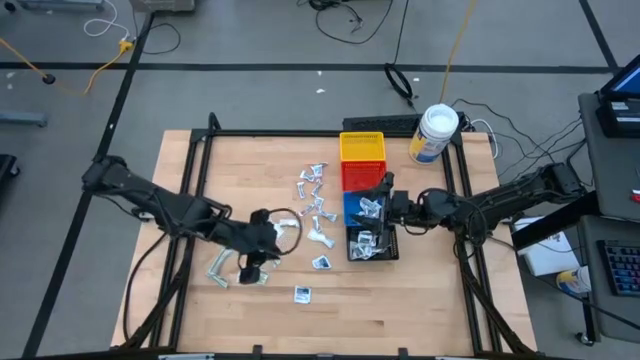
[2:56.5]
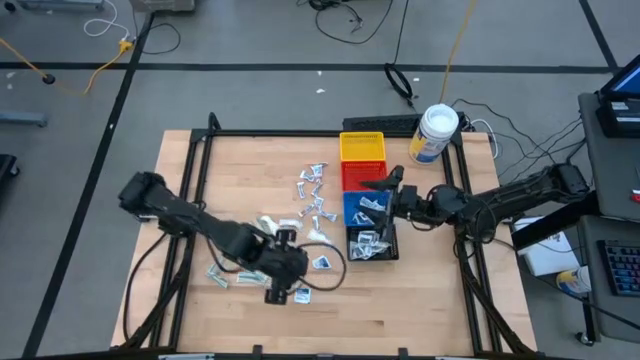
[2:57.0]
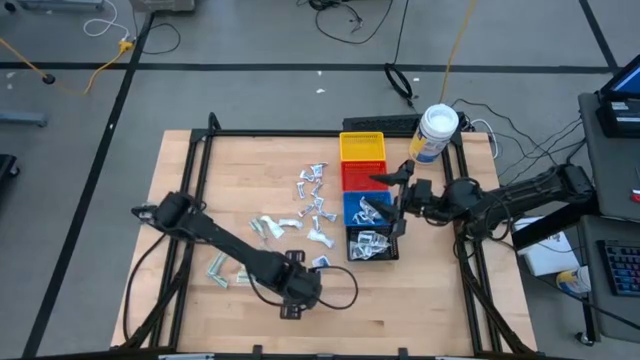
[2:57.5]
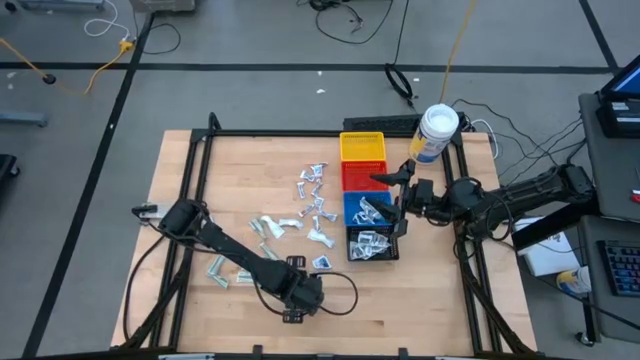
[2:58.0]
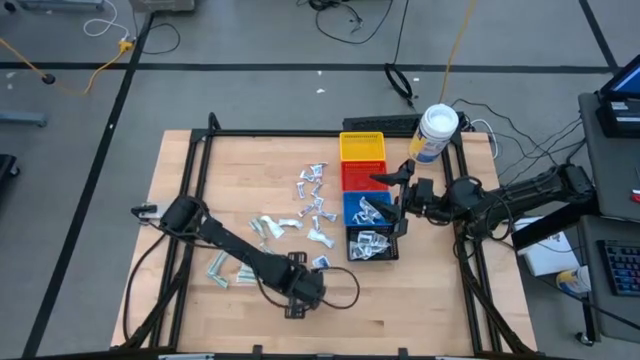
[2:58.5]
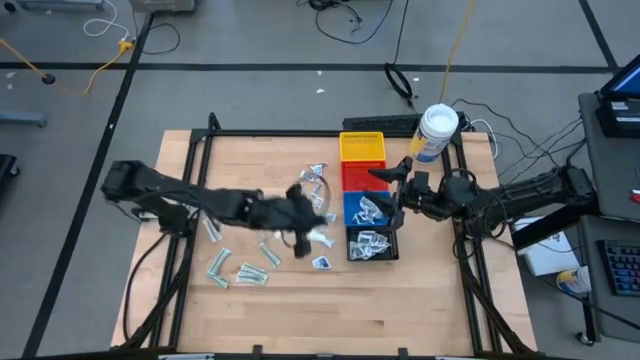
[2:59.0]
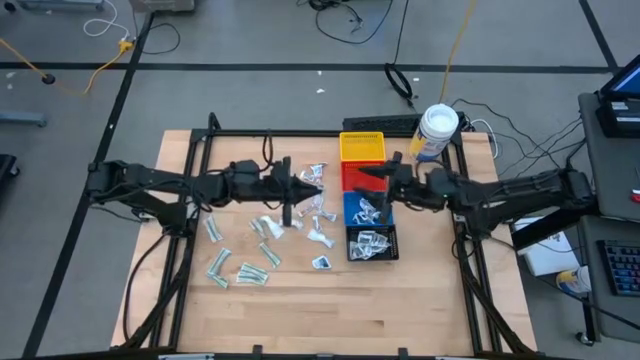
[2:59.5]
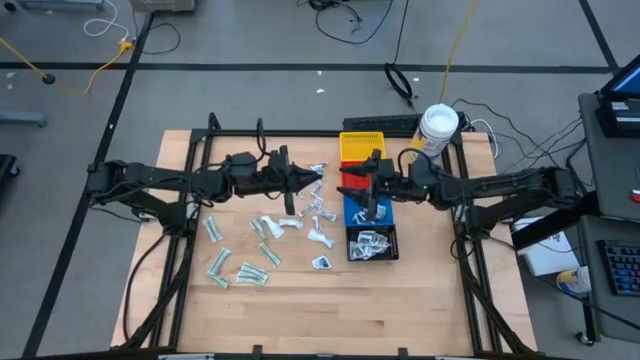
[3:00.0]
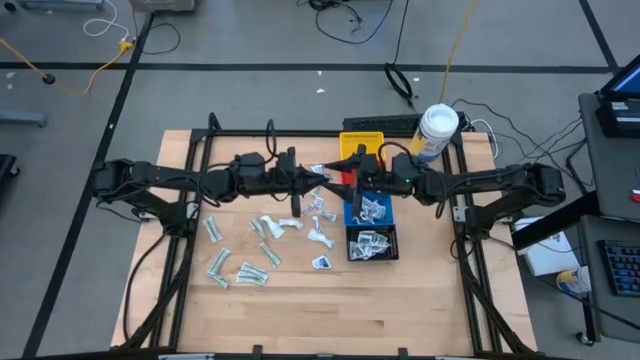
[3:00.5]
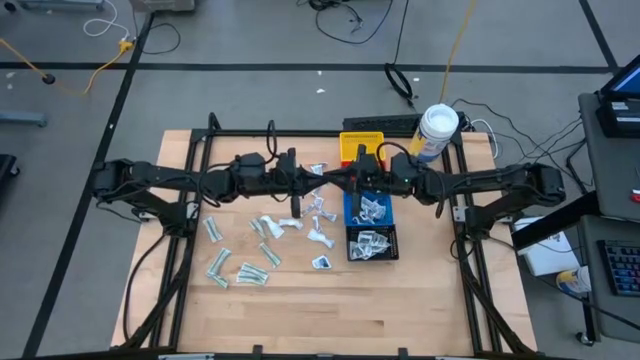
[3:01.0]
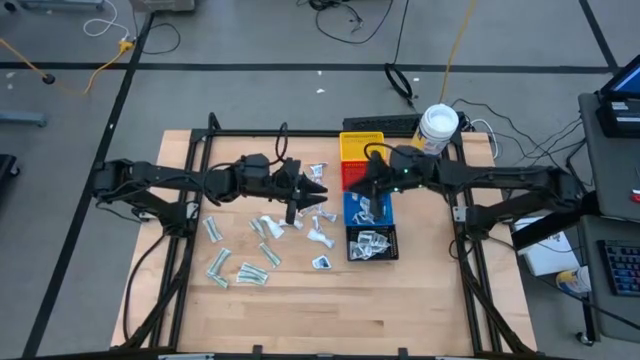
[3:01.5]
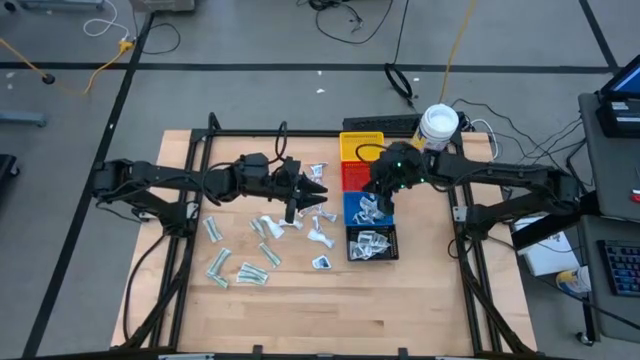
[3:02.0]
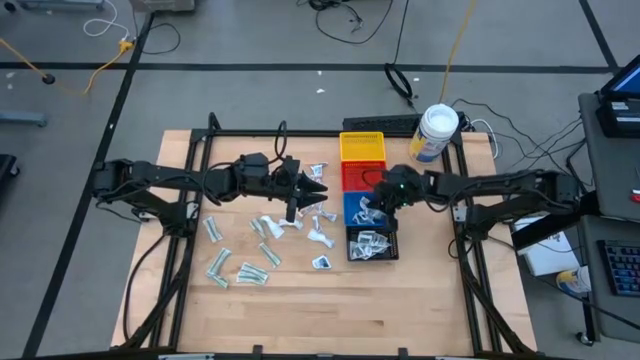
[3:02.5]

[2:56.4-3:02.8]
Task: Pick & Place First Aid Supplies
Put the blue alcohol pad into the blue bin

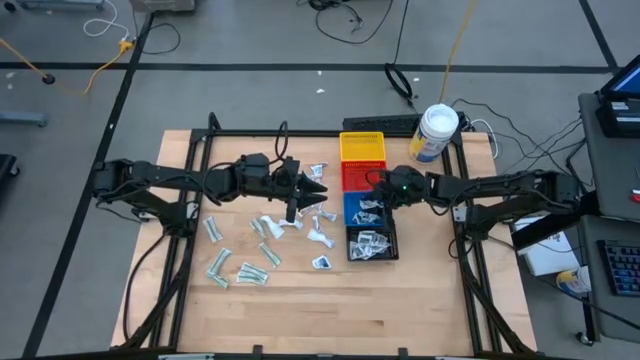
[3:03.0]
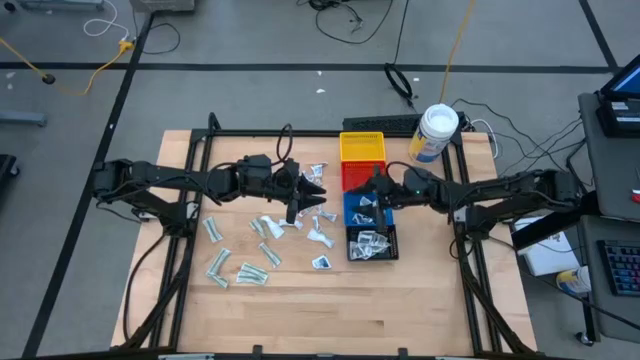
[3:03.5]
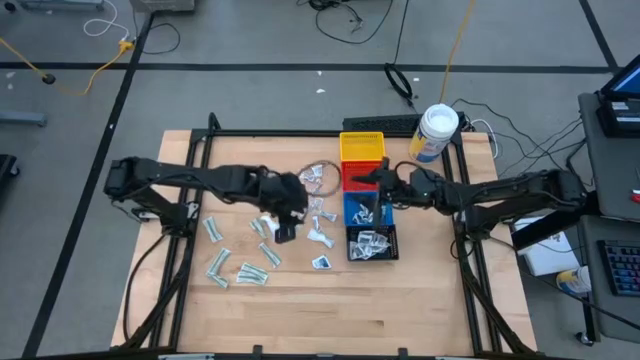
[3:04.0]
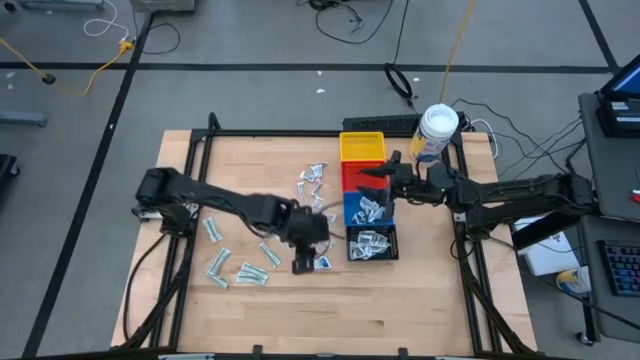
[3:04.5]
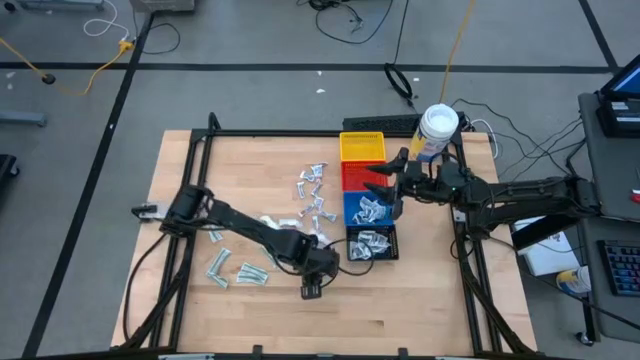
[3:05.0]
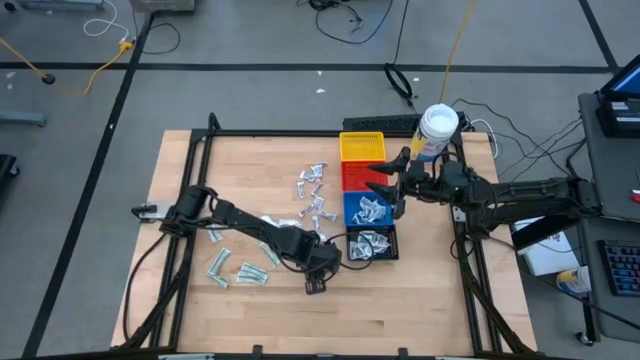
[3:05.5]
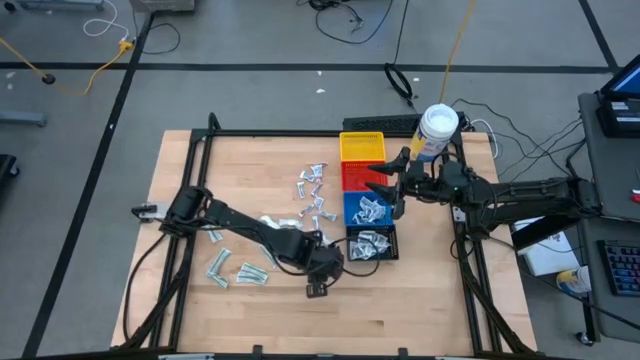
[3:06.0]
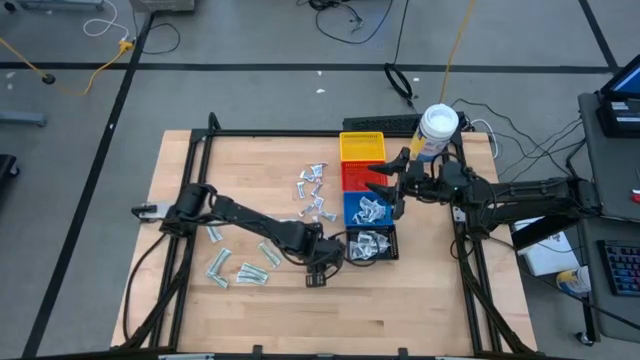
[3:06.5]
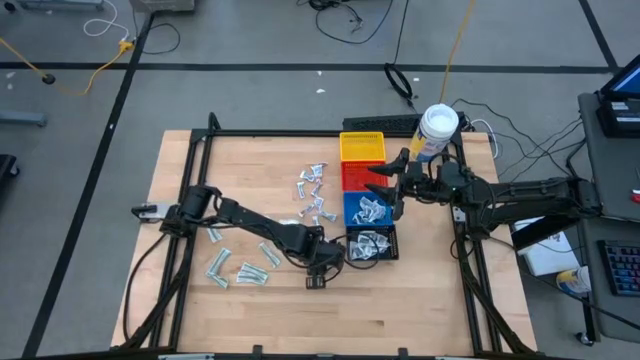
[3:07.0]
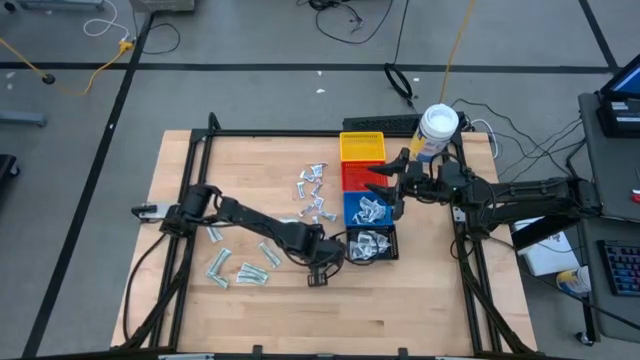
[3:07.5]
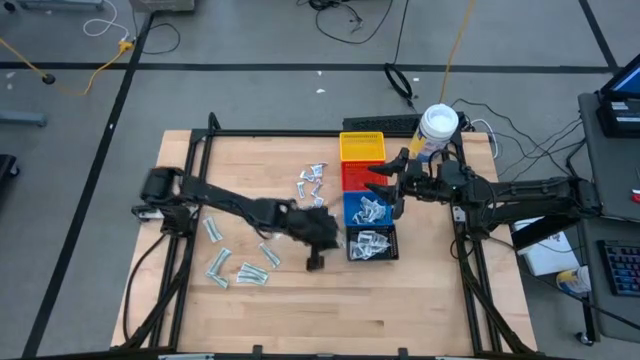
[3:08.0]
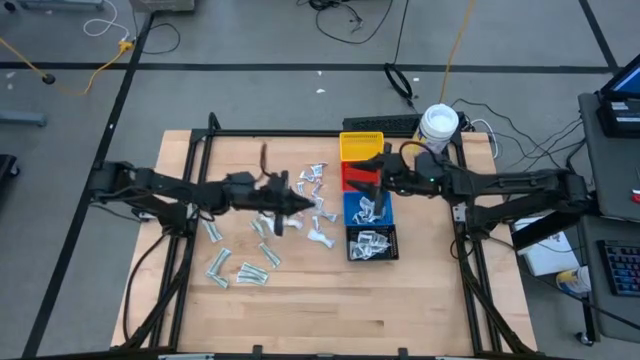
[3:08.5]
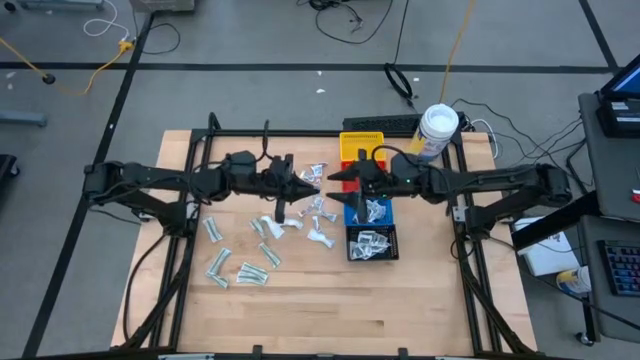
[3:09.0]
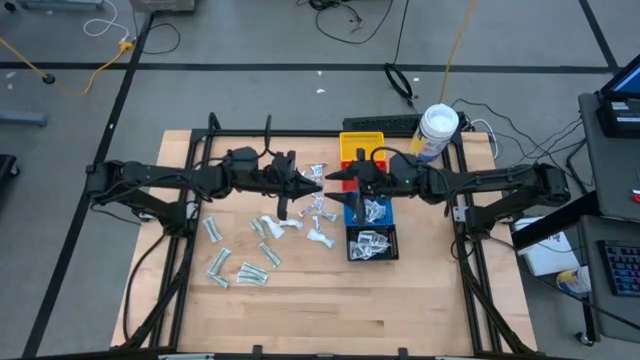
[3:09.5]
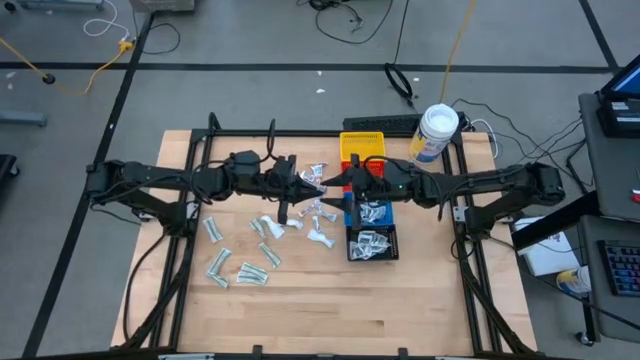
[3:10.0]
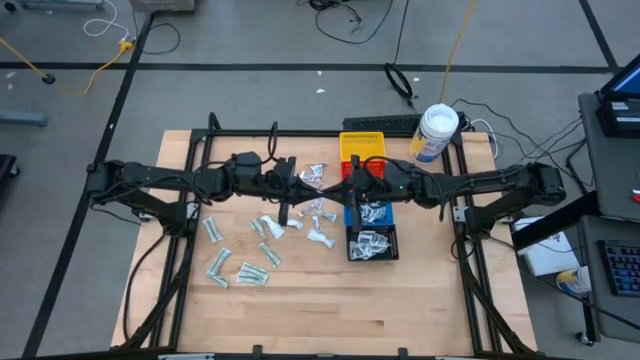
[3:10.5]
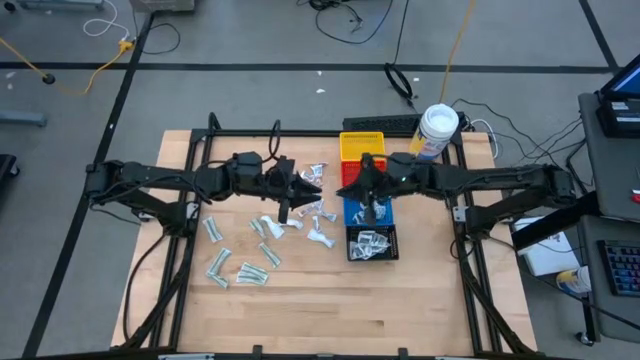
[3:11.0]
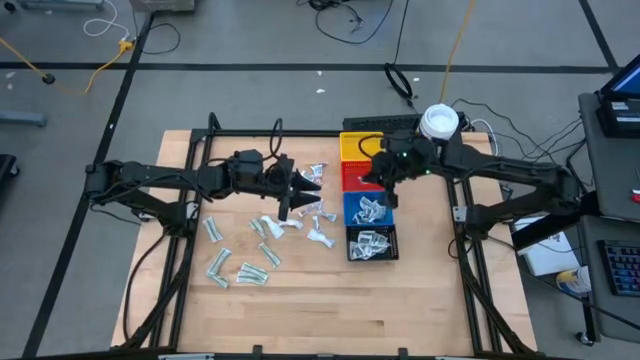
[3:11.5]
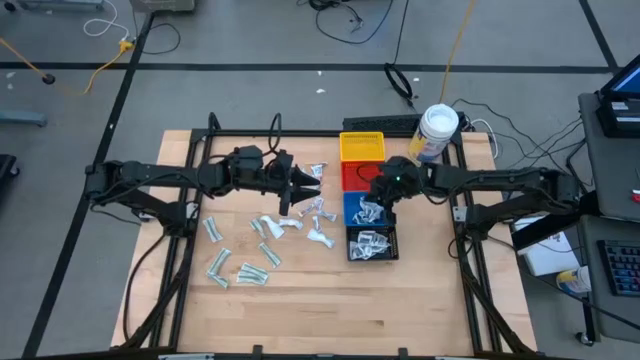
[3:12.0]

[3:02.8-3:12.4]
Put the blue alcohol pad into the blue bin

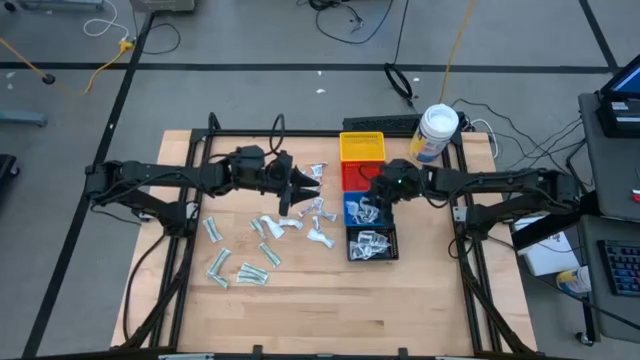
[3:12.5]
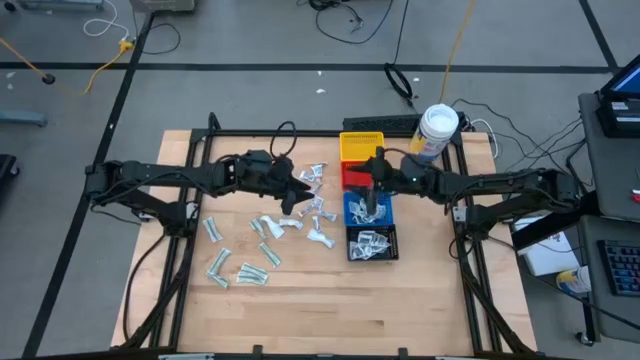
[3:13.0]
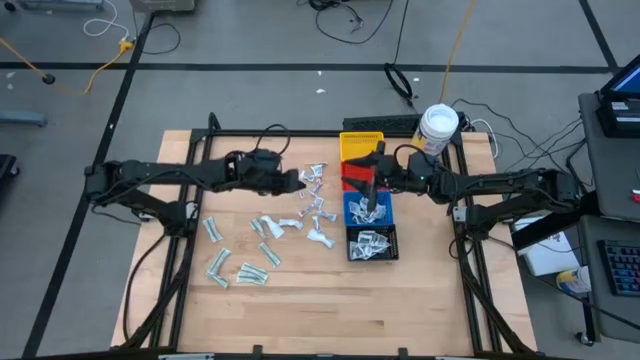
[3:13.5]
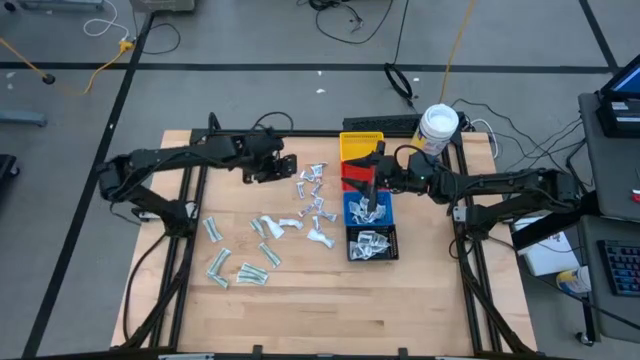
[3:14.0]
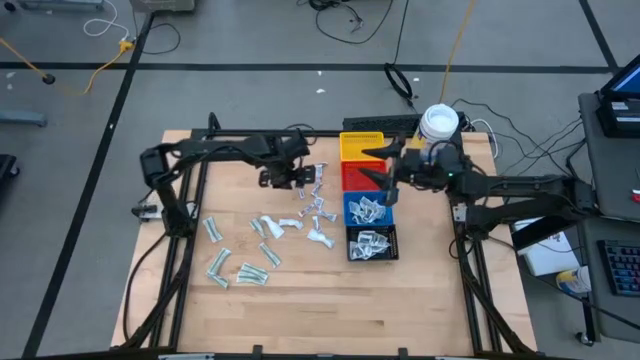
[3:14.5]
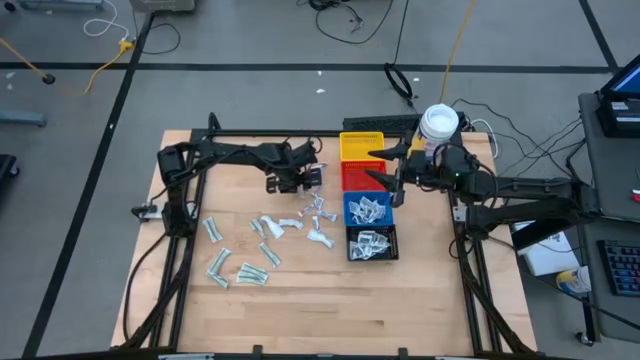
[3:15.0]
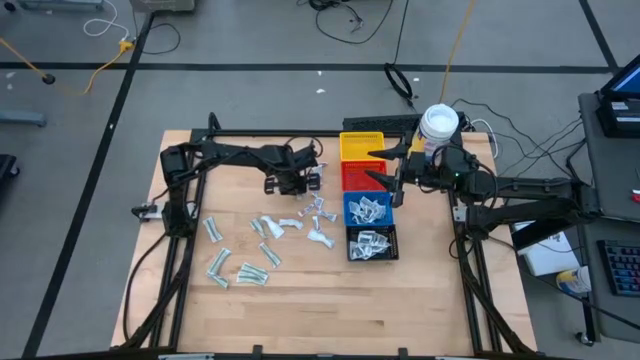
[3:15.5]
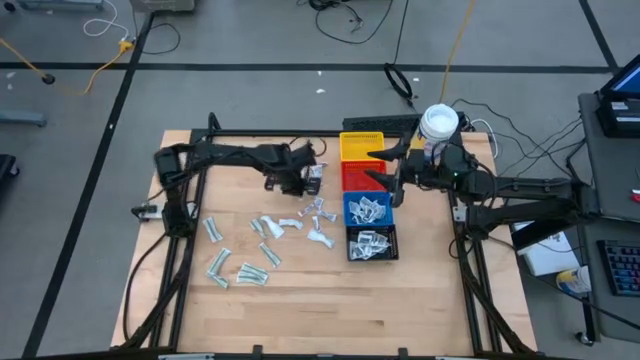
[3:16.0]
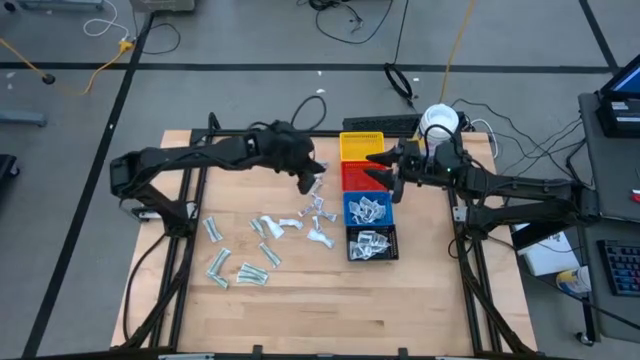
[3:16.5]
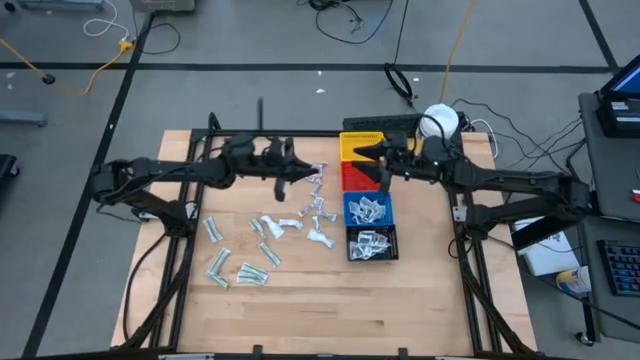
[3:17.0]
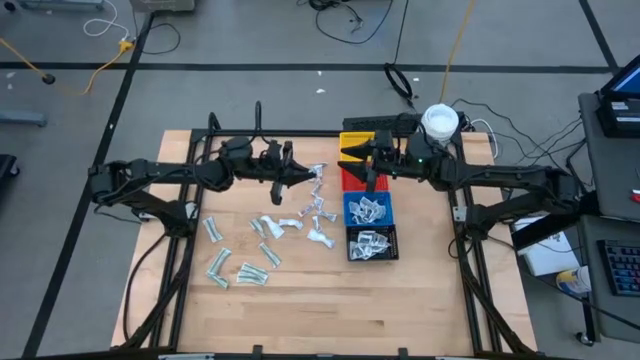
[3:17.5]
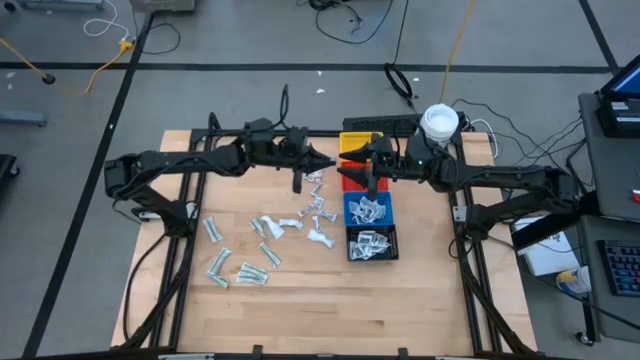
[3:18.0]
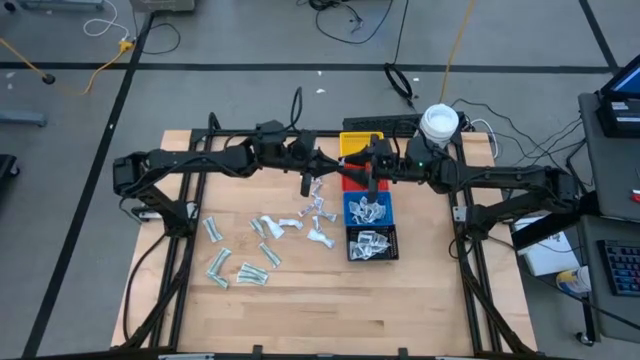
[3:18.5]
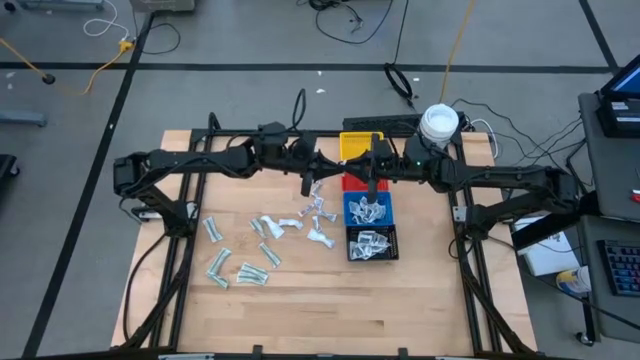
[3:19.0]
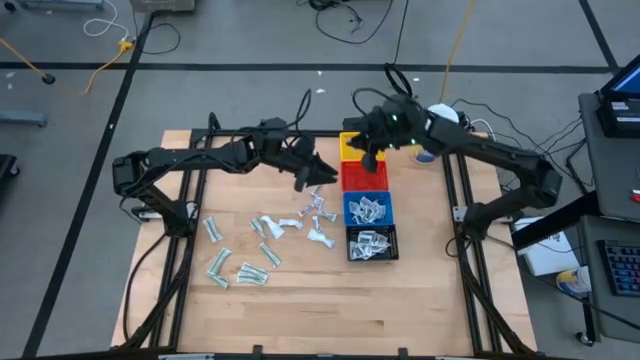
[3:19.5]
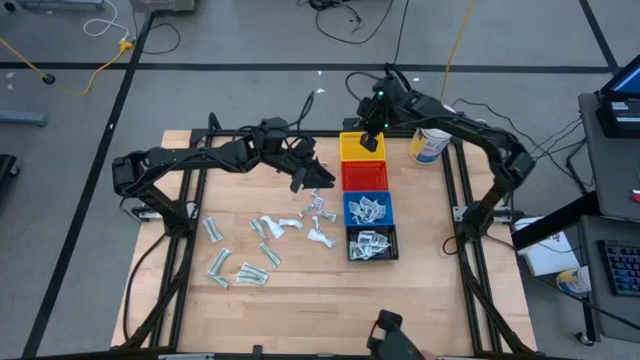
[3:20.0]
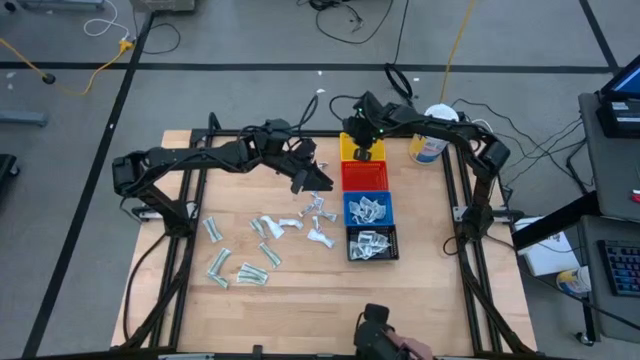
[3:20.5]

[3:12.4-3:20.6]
Put the orange ointment pack into the yellow bin
